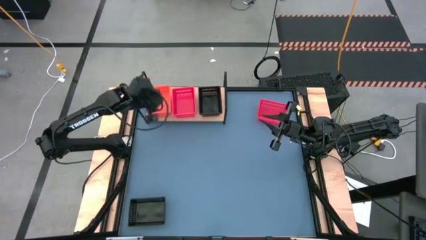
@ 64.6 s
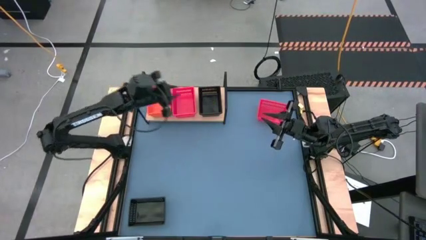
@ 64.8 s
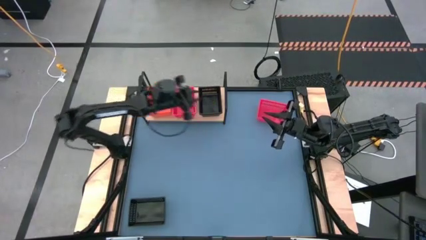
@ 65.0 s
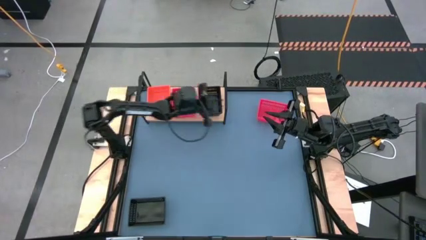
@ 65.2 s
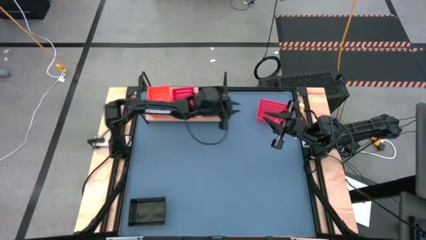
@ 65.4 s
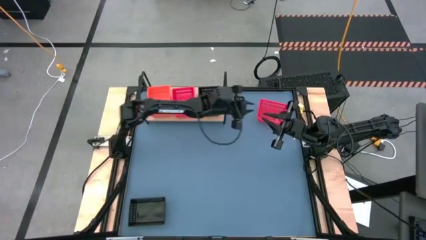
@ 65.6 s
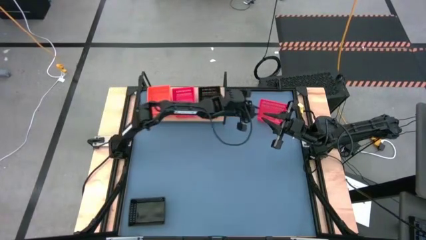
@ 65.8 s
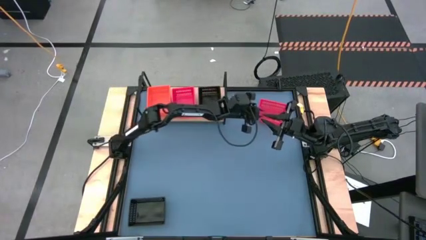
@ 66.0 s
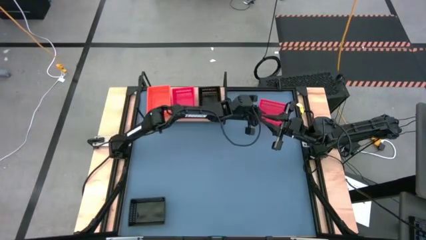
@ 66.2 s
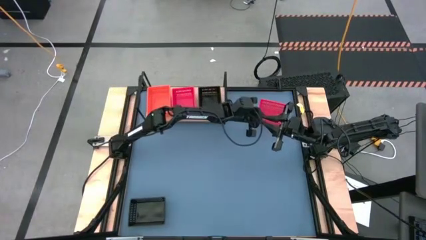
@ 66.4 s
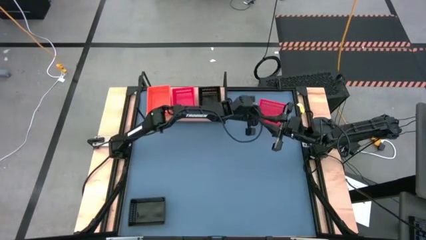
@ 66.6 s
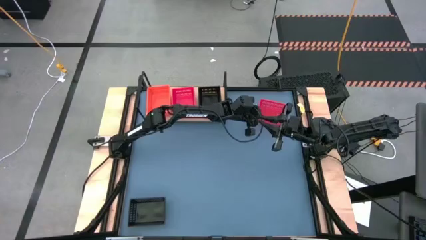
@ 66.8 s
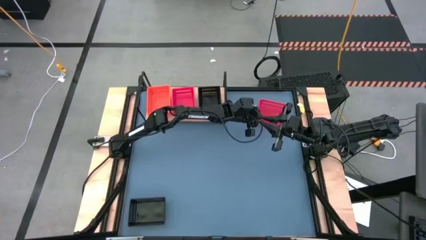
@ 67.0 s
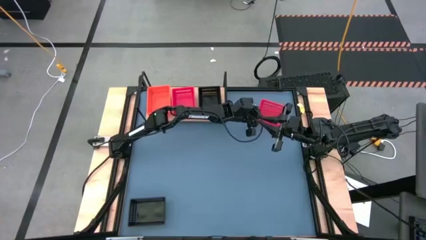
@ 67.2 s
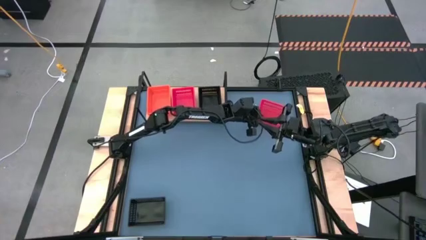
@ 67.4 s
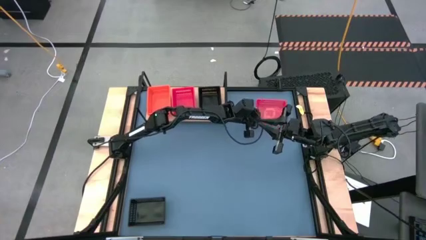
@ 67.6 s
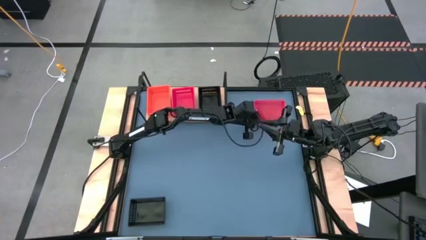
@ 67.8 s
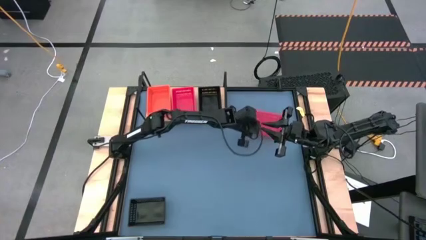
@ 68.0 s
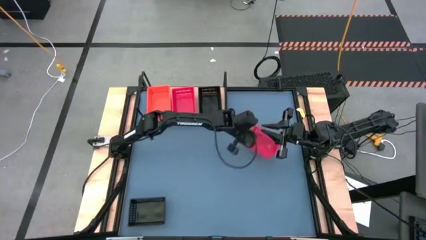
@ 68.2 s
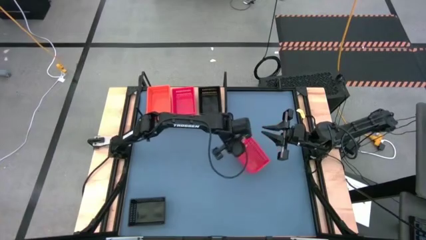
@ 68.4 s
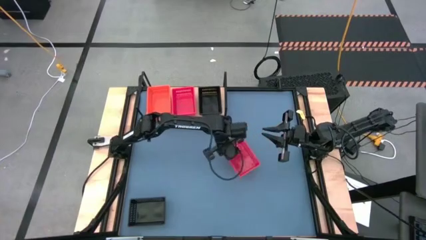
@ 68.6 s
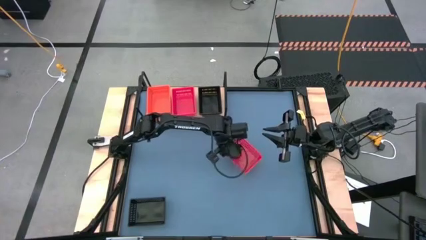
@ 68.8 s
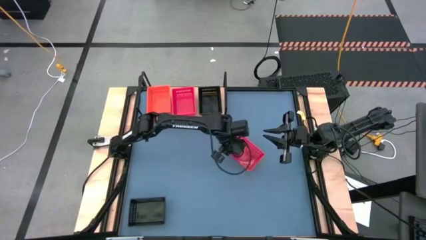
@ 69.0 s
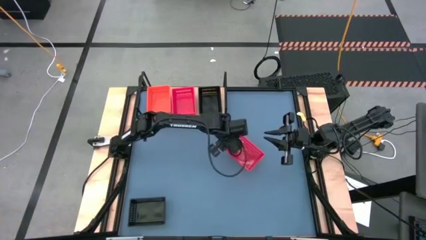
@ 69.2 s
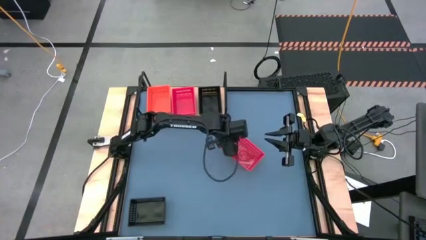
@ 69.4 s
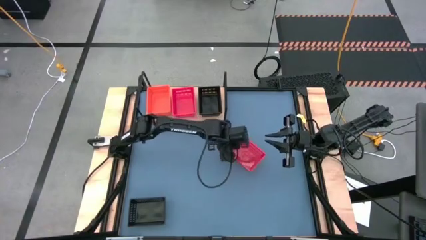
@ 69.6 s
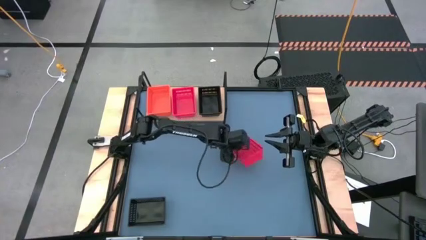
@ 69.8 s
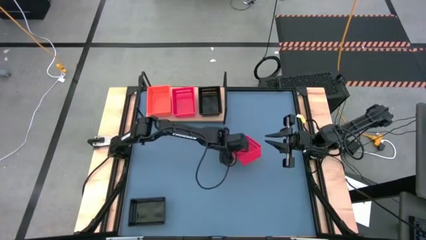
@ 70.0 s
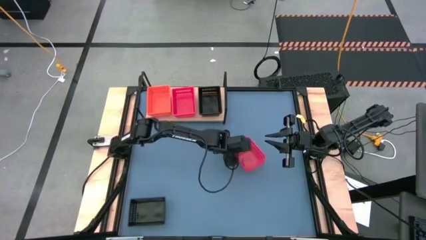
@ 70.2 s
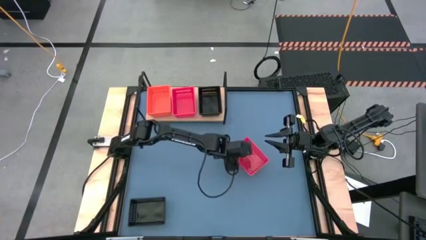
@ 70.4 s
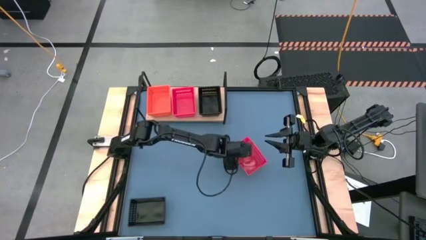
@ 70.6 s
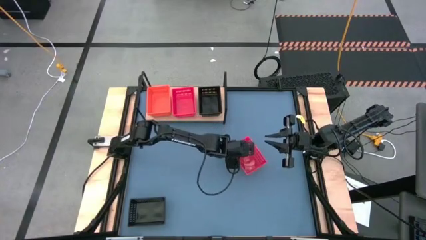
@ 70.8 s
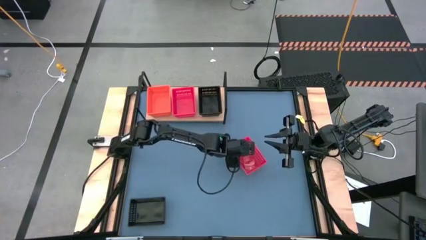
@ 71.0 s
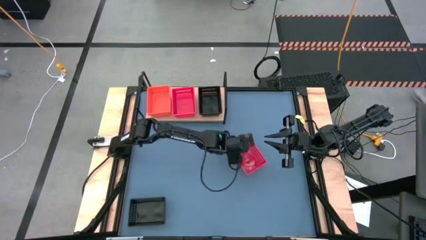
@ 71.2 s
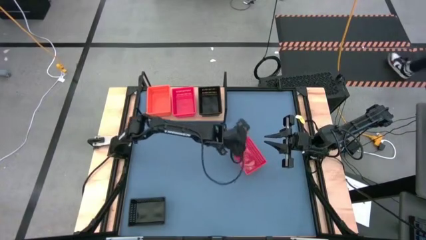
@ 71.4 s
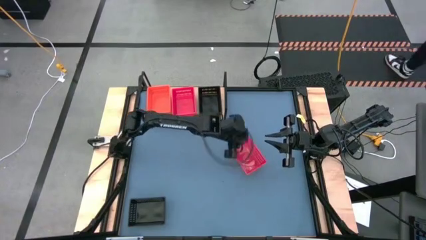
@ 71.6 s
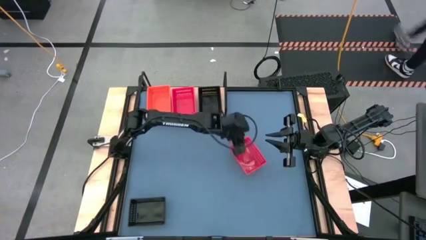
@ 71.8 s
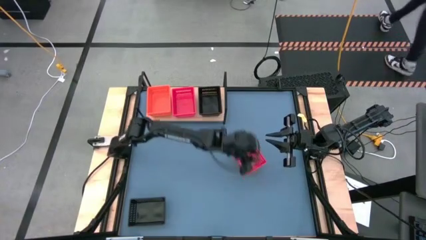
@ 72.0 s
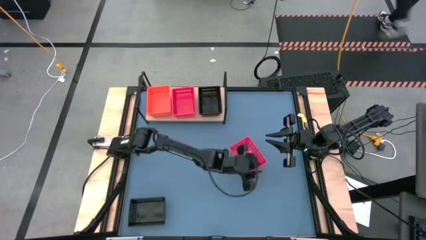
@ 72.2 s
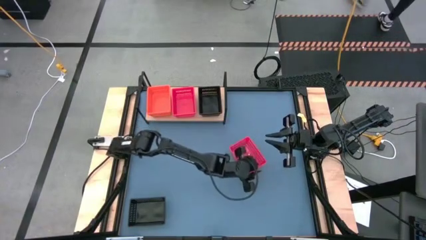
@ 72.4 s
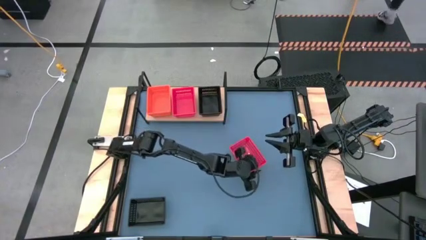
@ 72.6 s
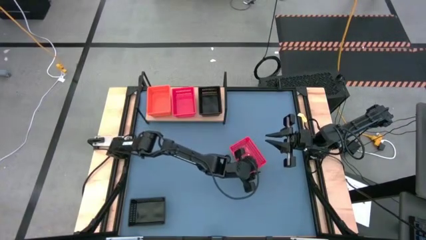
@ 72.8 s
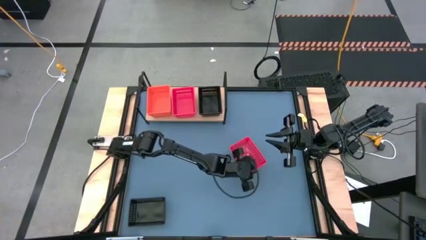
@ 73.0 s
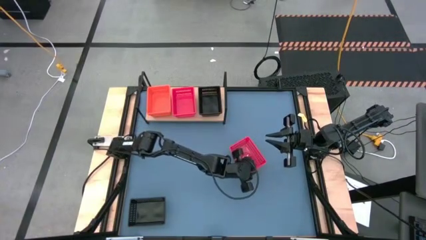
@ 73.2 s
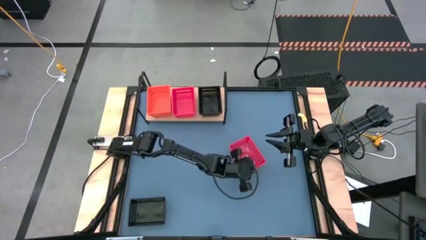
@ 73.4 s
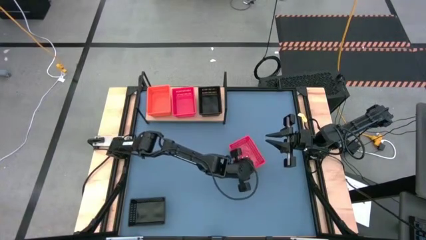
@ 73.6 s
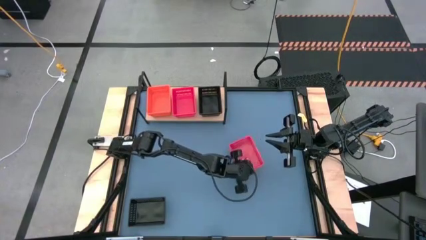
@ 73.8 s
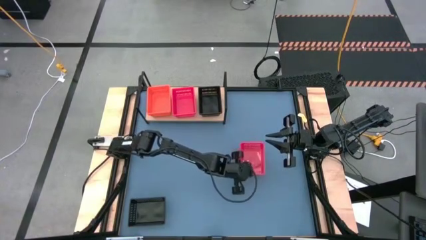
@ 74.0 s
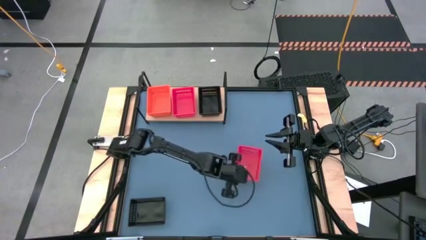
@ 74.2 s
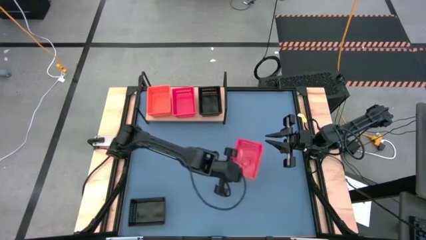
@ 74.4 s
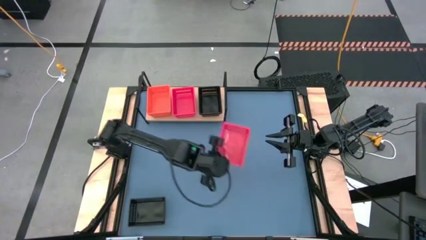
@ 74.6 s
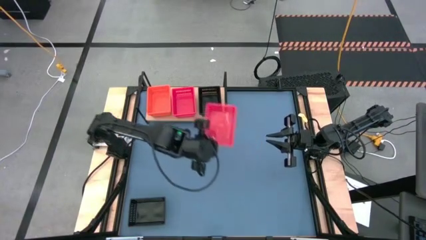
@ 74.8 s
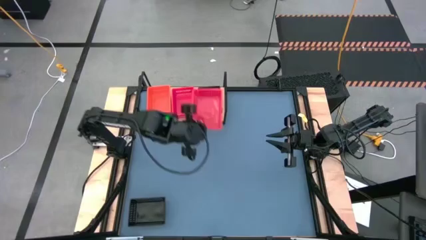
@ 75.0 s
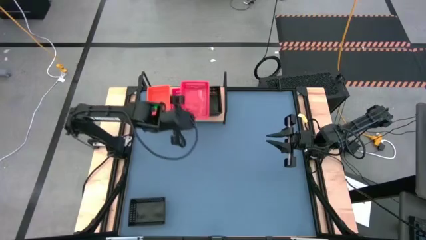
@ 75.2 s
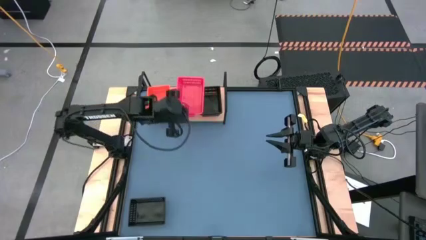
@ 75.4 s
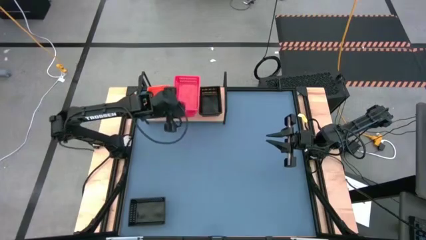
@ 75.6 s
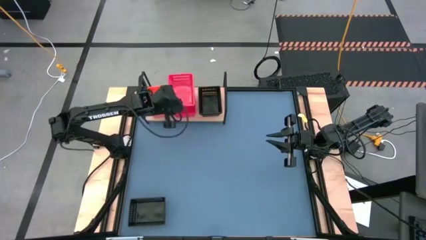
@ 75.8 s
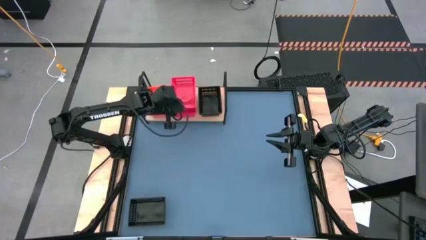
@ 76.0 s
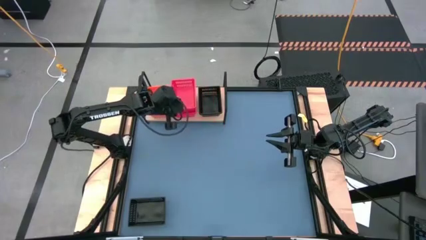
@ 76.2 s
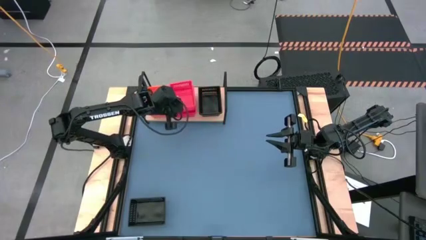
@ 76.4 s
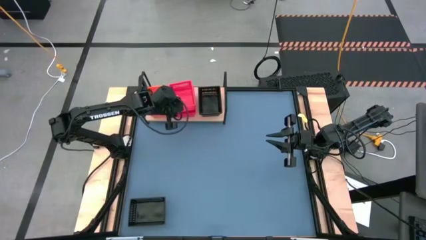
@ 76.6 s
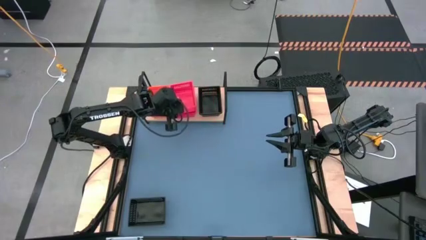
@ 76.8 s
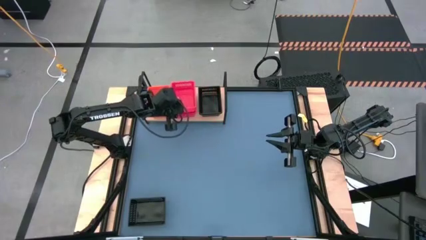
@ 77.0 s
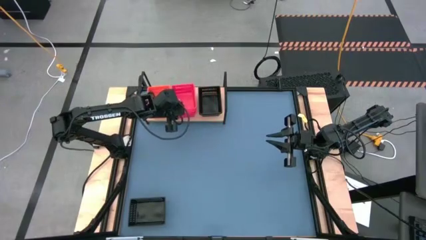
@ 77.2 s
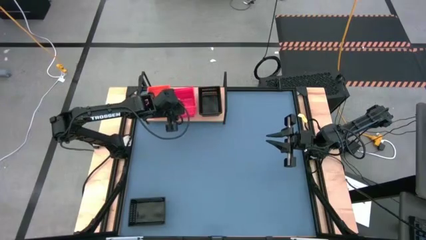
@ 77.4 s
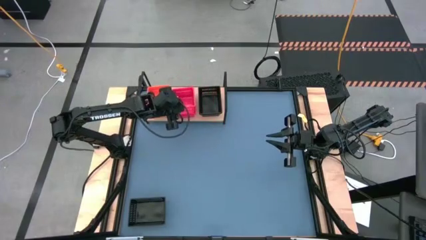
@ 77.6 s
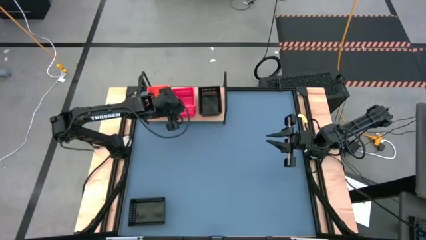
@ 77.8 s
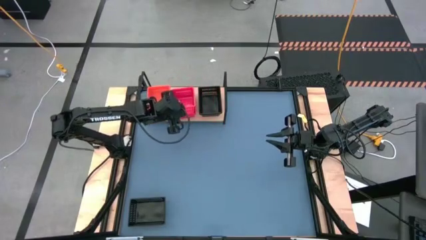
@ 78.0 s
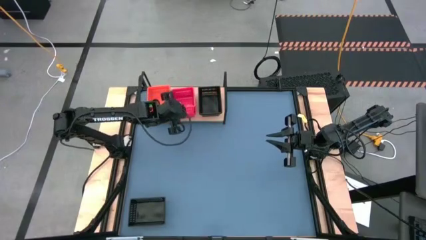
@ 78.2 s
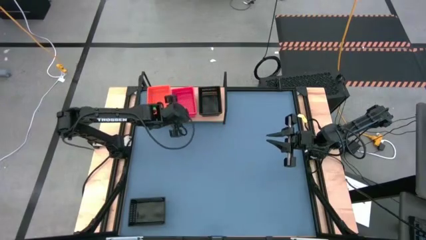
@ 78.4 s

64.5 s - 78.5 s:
Task: Stack baskets on shelf by color
Stack the red bin on top of the stacked red bins on the shelf

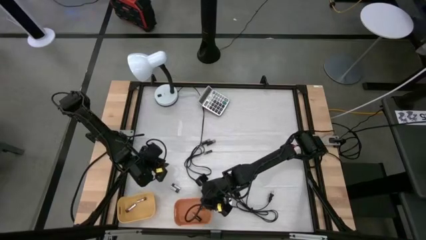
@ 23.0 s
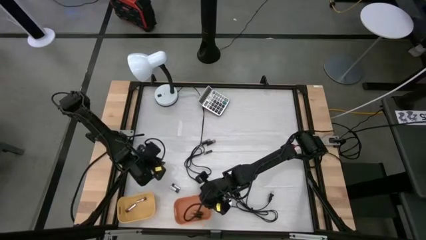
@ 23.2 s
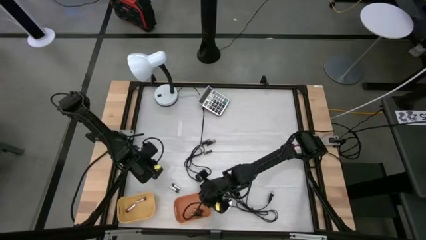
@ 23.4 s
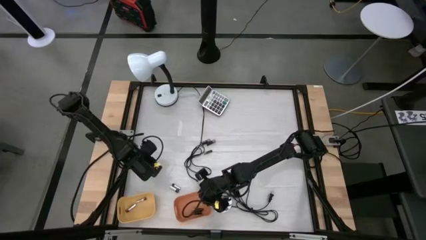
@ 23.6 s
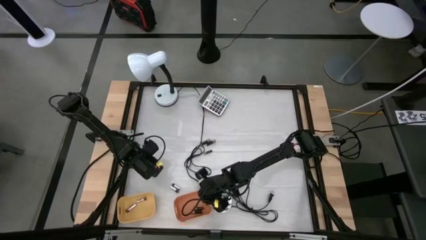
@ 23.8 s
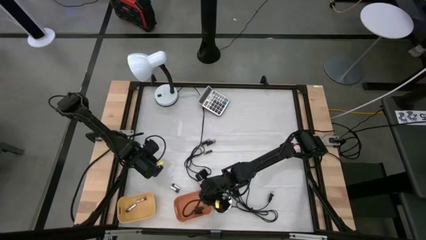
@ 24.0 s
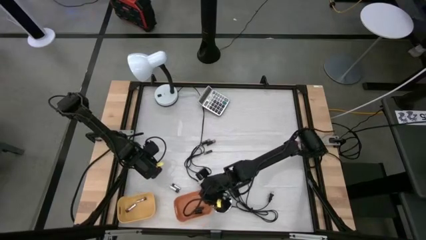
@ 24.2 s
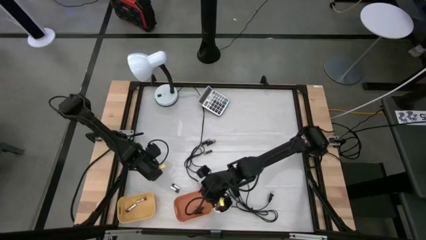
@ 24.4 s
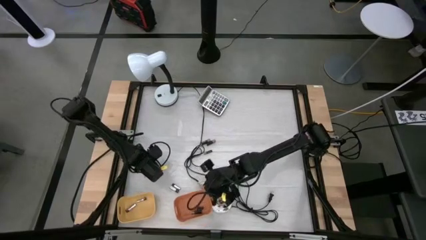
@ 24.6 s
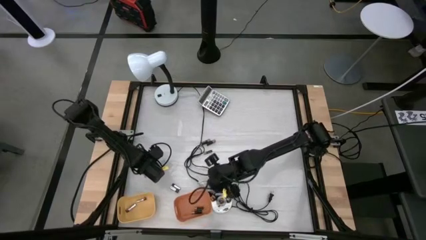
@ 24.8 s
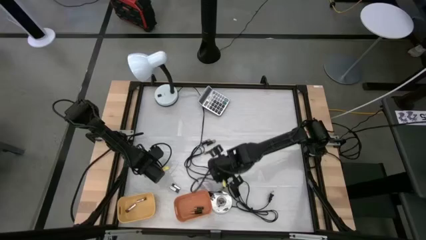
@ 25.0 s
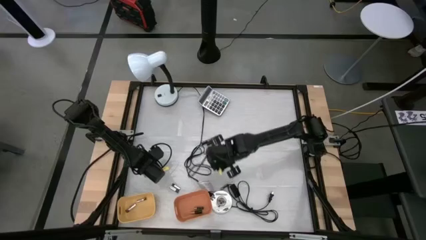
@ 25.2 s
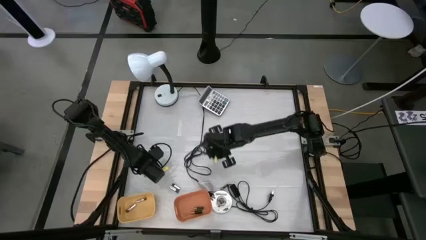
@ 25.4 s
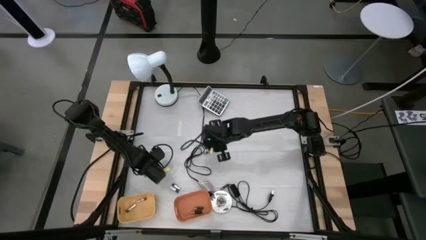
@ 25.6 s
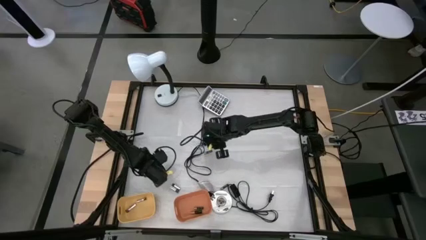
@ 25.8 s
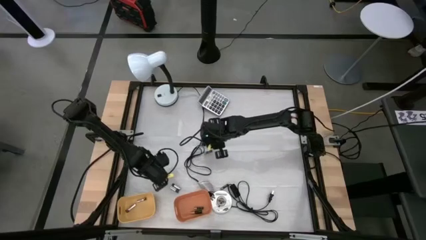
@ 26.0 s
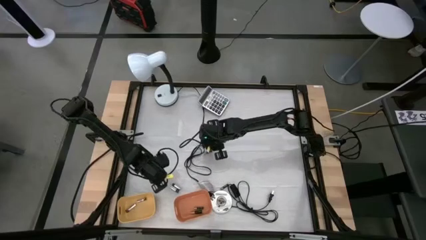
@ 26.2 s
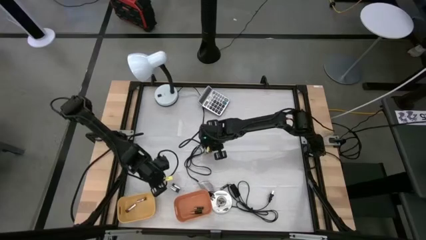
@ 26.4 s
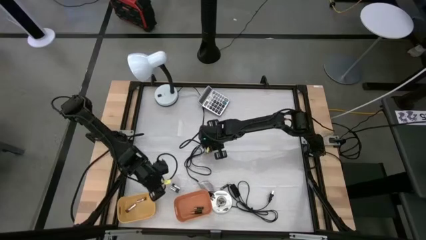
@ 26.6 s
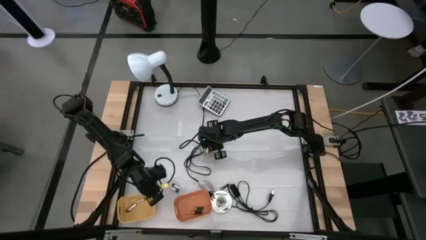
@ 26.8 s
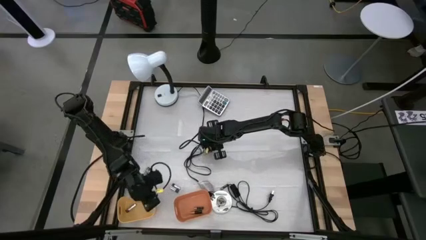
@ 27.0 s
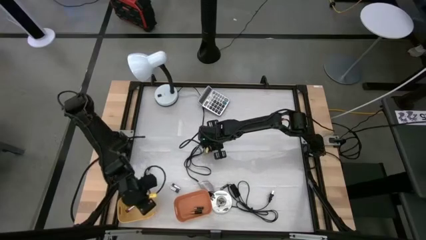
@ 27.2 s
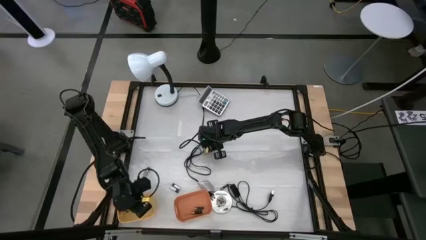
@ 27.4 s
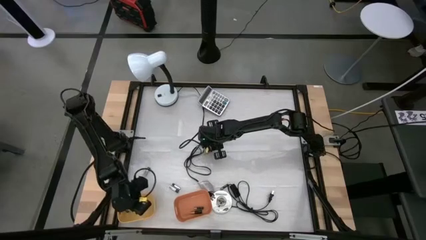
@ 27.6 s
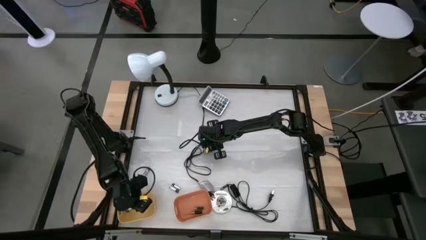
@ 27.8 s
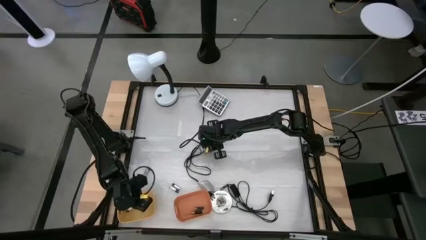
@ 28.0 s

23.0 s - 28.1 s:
Task: Sort batteries
Put the silver battery into the orange bin
